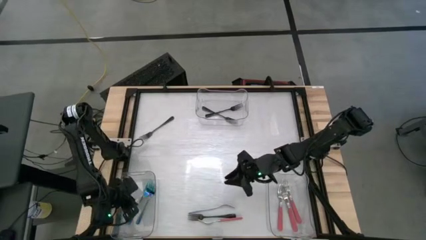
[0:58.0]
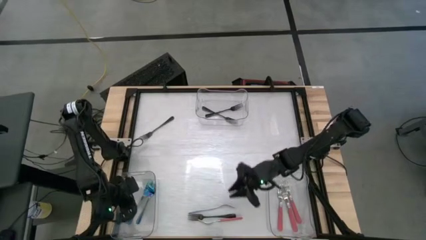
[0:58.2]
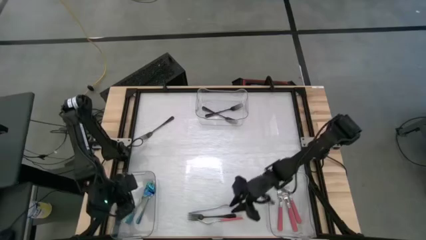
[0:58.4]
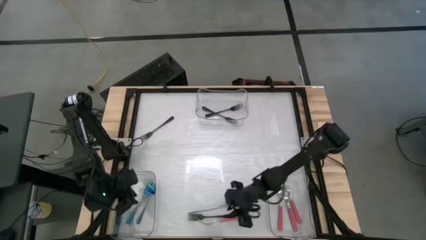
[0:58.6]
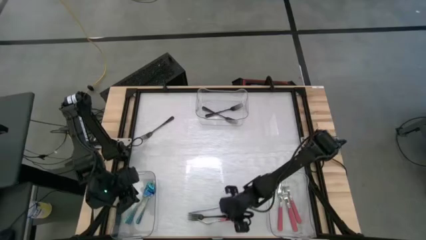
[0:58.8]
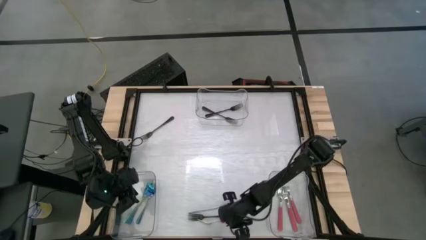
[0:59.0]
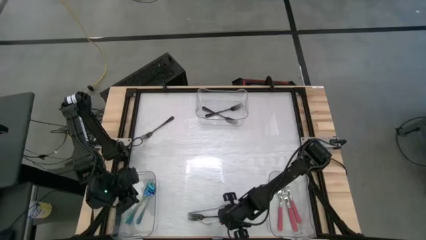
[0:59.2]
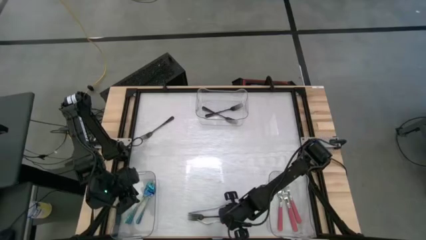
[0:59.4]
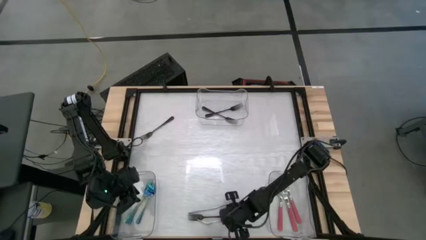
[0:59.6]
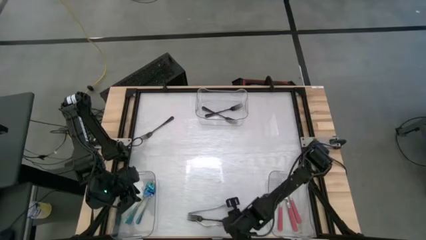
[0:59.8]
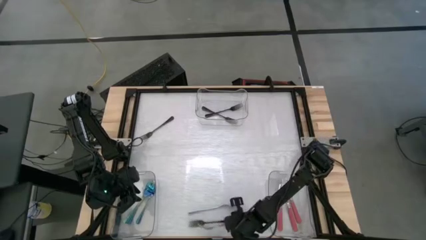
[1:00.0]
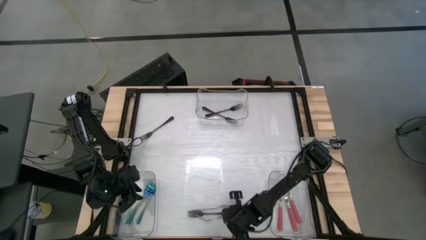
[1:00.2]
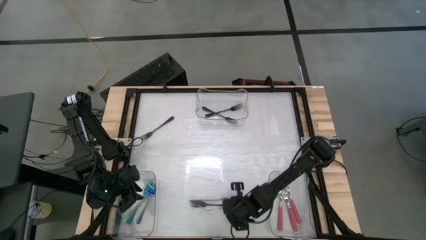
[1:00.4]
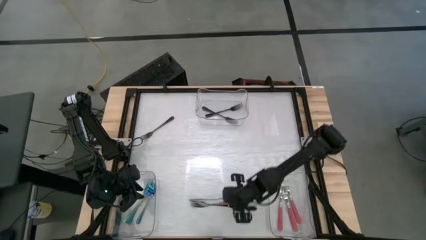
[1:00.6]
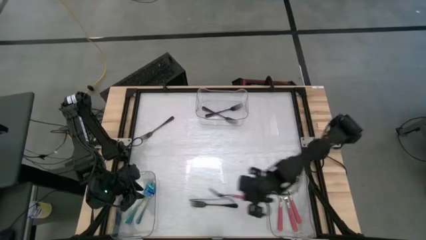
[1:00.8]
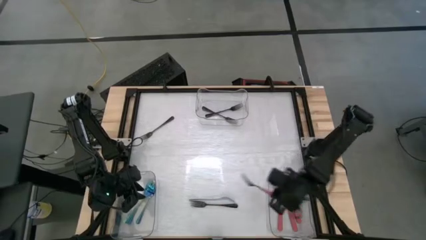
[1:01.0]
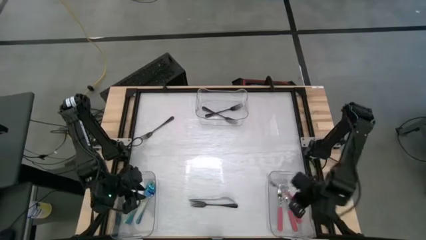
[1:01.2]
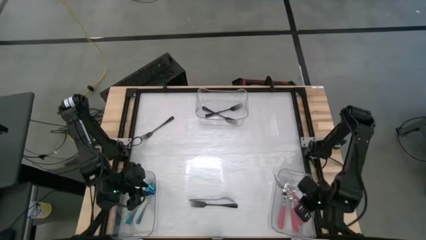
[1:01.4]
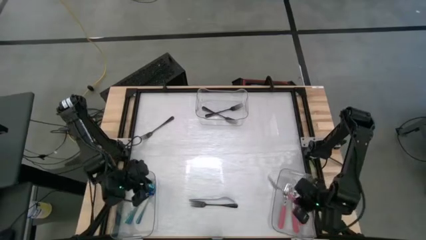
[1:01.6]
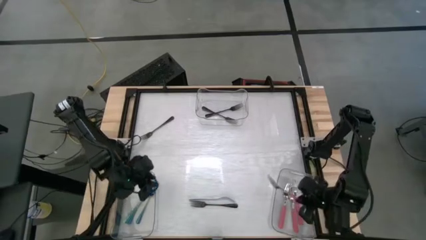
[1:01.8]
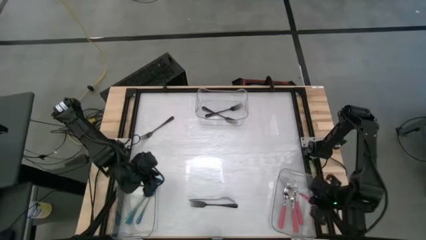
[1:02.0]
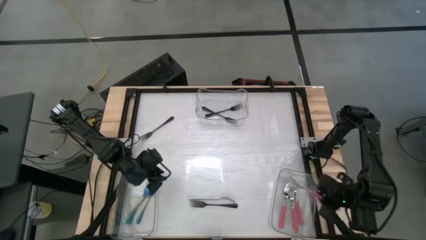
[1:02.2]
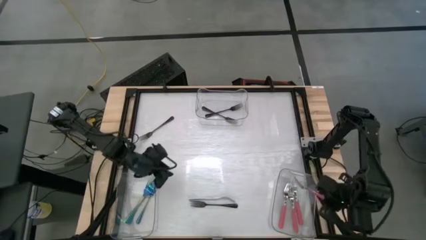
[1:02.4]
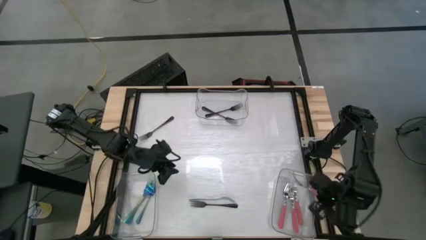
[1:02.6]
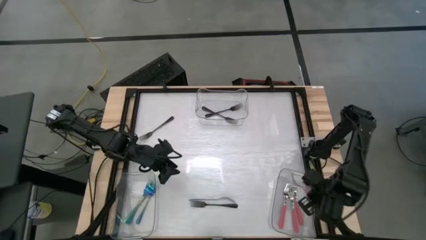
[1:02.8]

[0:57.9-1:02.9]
Task: Sort silverware by color (type)
Put the pink fork into the bottom right transparent bin

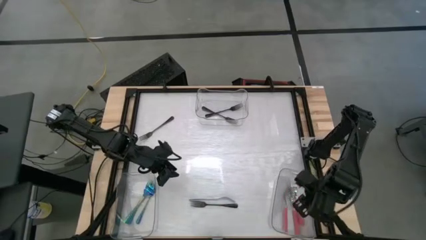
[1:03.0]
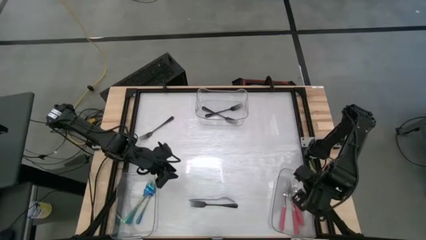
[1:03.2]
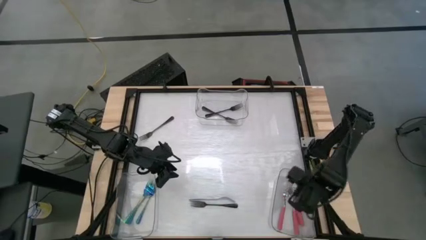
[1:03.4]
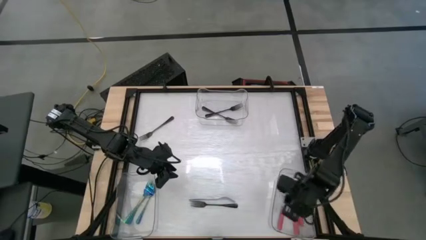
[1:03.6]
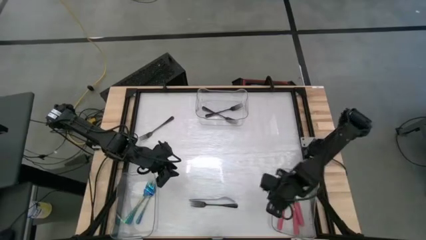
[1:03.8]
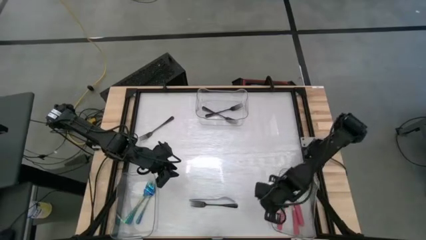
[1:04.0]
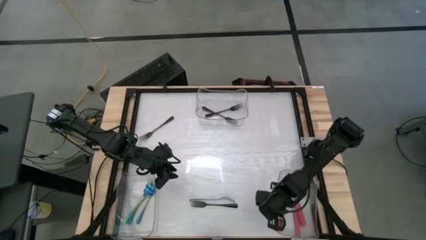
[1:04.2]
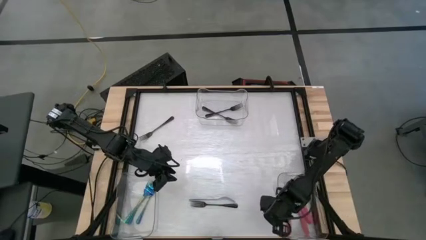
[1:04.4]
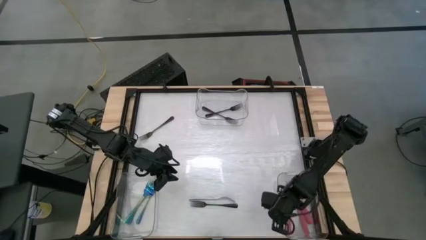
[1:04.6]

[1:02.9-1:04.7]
Adjust the bottom right transparent bin

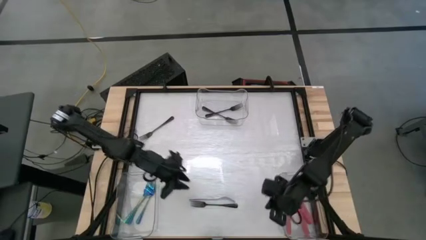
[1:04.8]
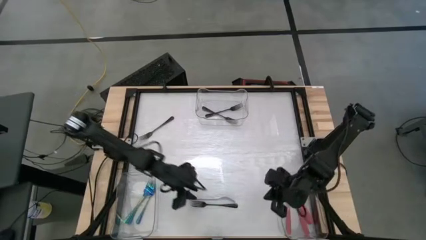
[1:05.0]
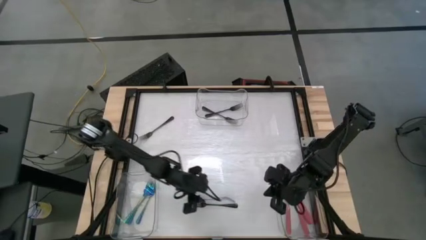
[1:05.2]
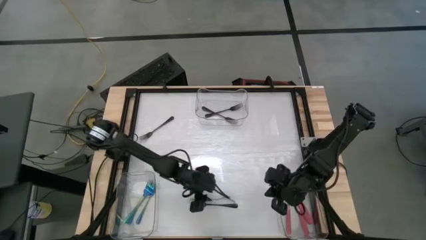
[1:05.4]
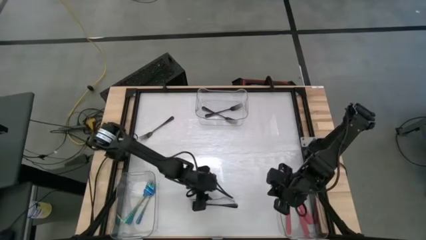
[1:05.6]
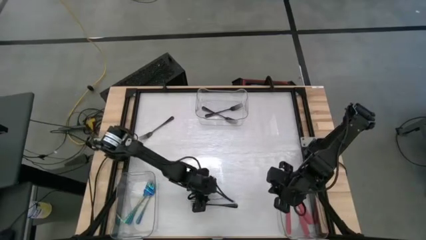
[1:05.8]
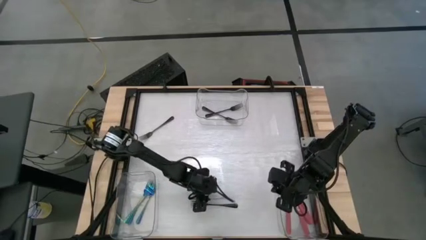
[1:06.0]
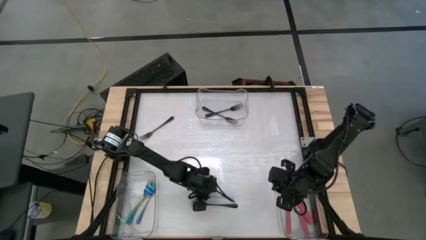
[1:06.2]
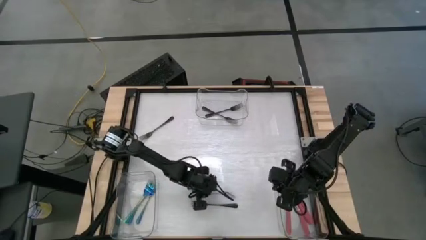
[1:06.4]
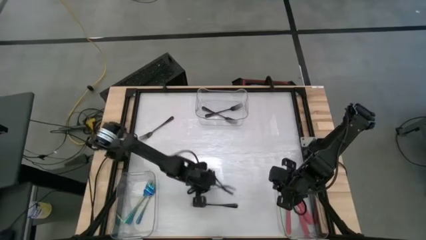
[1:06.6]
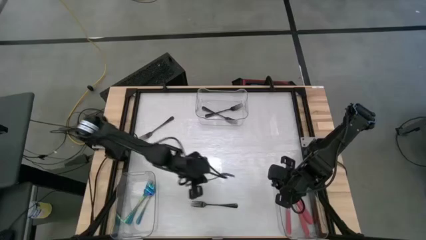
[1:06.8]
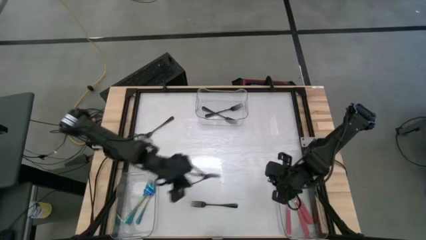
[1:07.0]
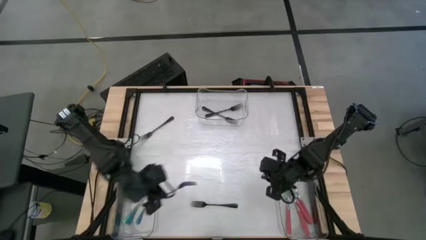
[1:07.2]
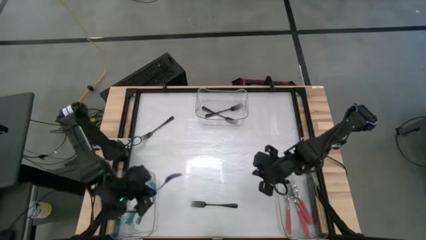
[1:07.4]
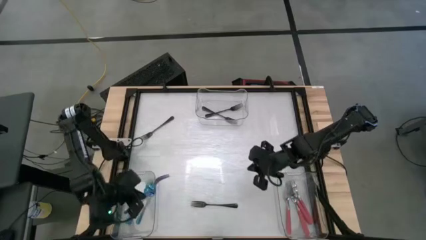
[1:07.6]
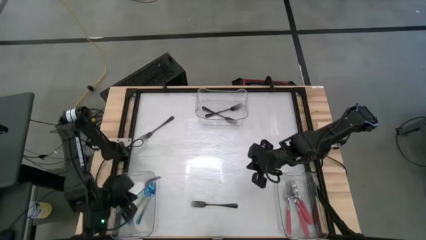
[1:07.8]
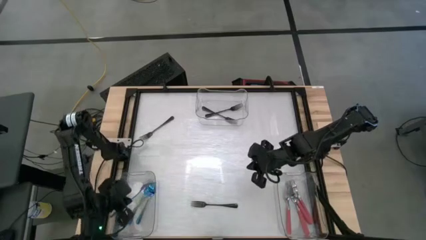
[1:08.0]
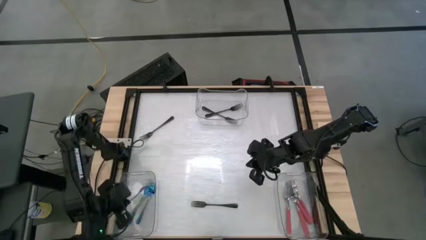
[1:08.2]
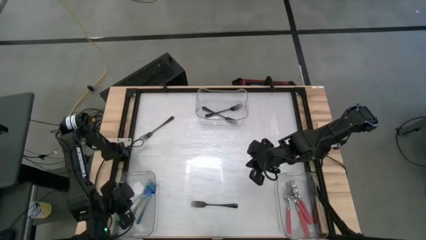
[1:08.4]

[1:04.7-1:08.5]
Put the blue fork into the bottom left transparent bin

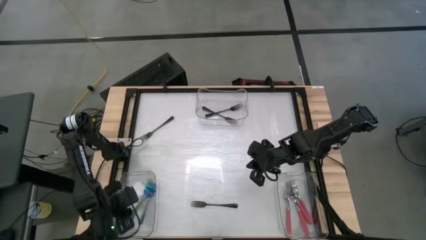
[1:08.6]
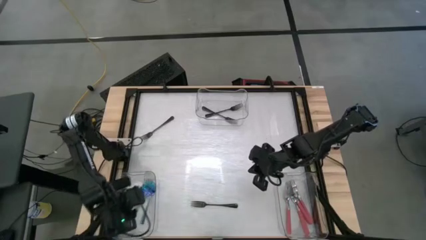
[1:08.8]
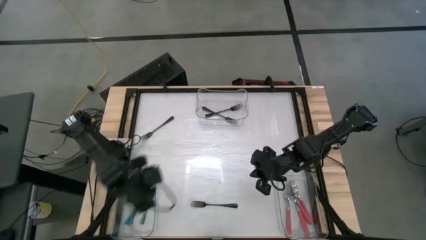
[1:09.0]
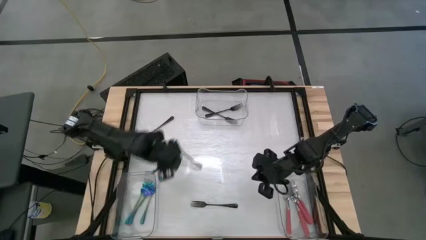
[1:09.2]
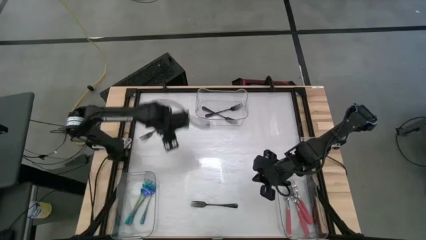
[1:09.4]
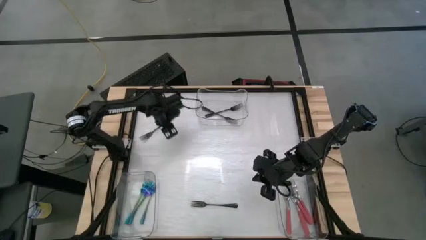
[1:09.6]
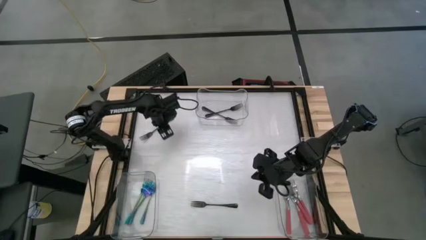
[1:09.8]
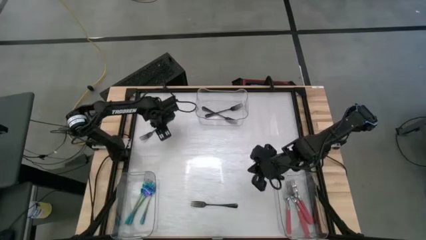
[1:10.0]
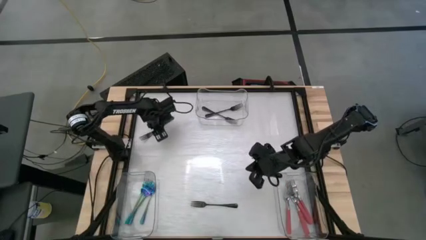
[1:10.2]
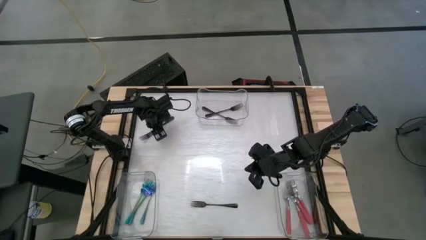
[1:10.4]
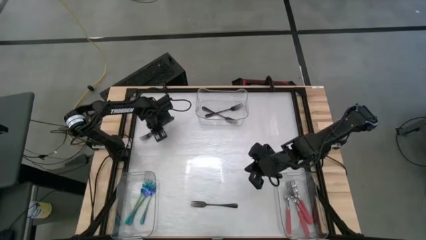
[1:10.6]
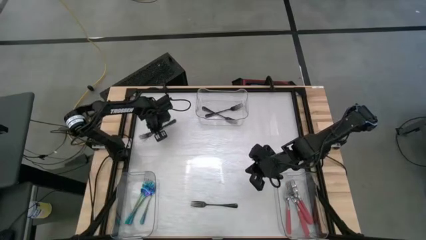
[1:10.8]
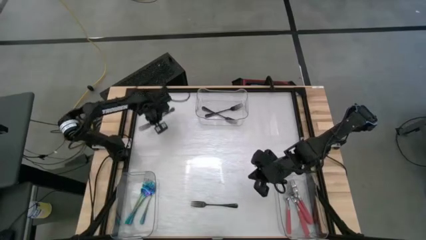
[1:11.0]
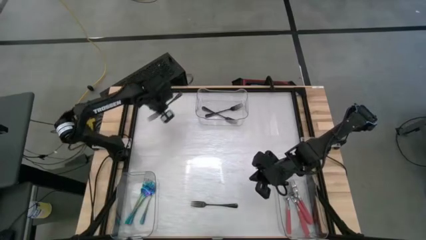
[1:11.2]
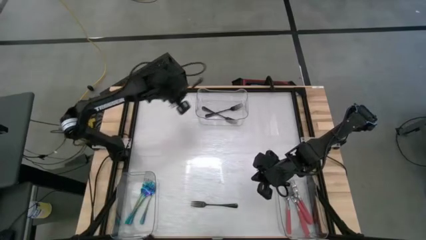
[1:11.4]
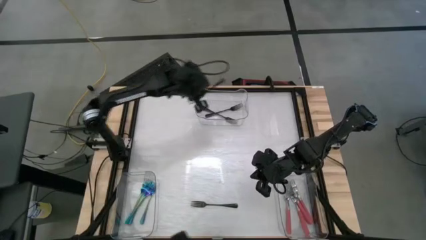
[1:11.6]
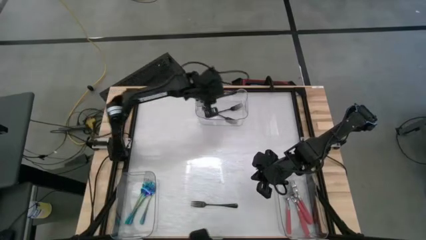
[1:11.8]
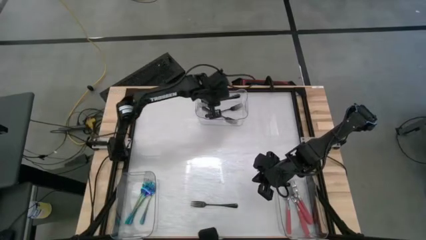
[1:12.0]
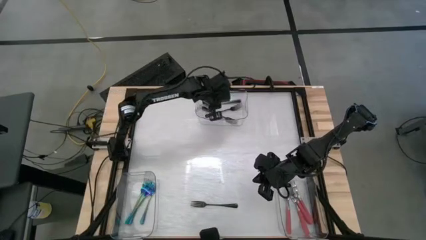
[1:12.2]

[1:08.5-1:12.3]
Put the black fork into the top transparent bin

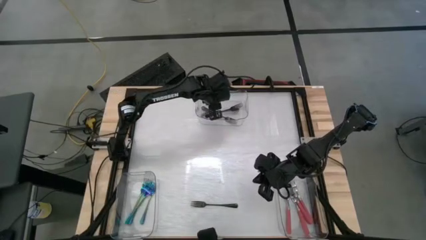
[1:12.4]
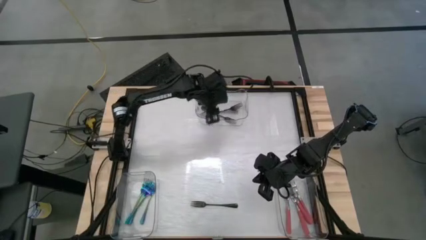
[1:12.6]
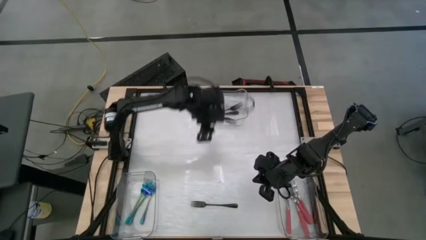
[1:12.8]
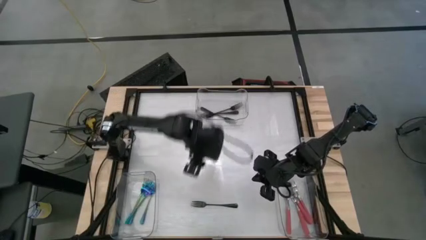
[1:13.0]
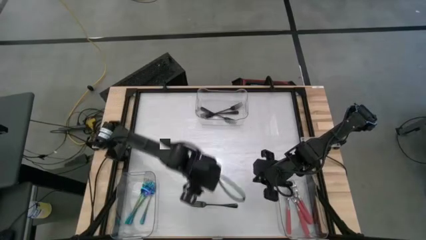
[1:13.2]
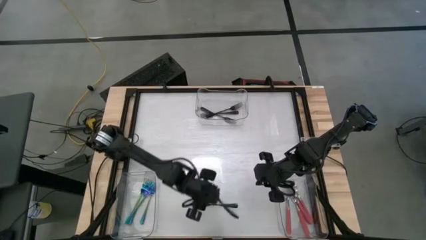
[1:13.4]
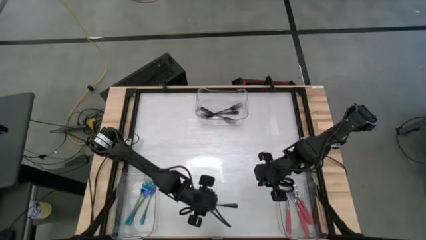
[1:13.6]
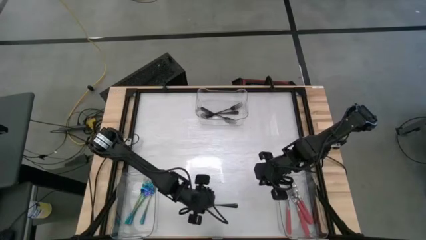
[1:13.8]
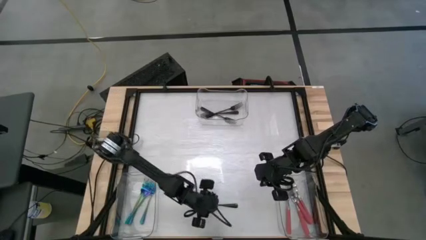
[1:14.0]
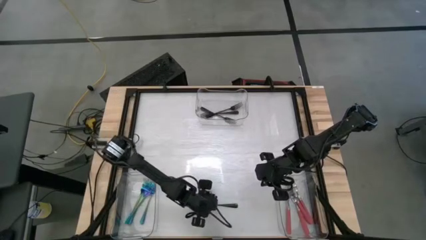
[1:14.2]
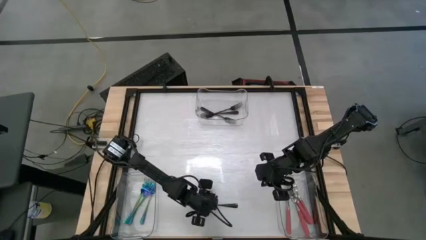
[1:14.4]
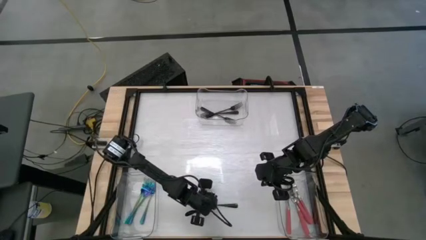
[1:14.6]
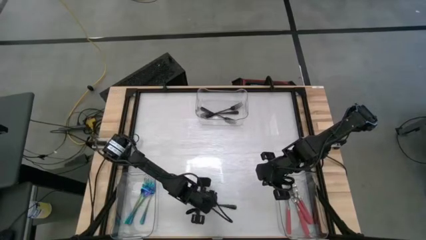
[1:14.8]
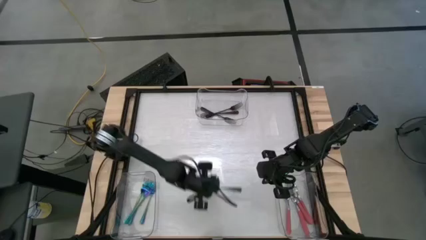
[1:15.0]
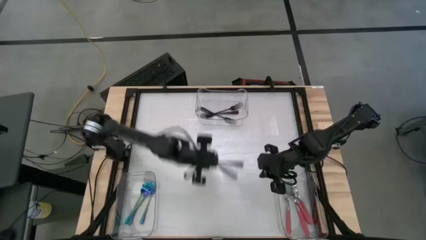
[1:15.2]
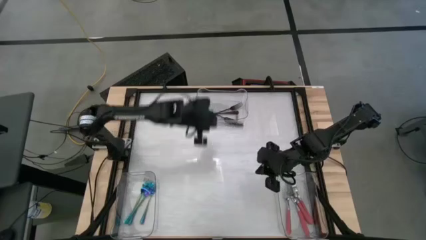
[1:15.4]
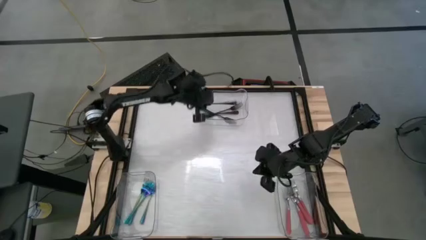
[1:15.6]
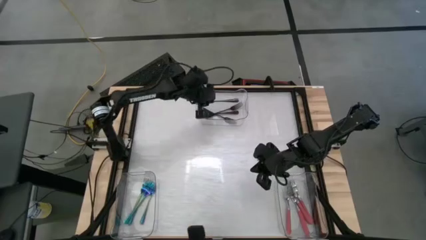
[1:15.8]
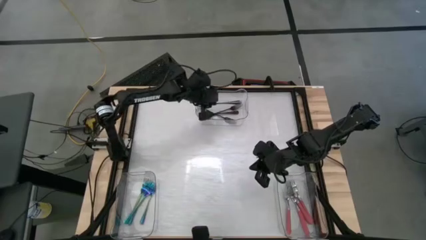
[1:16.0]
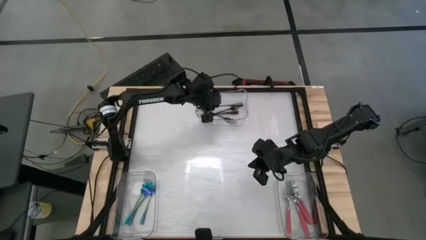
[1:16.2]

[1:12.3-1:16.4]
Put the black fork into the top transparent bin
